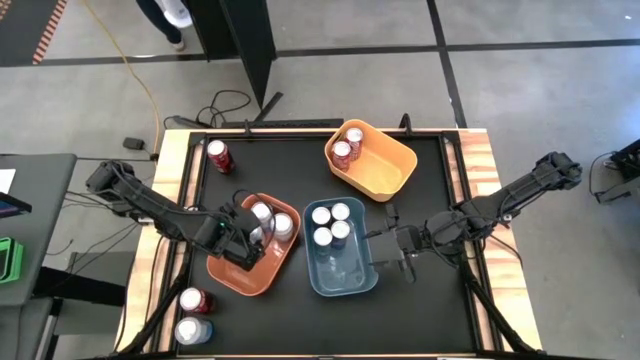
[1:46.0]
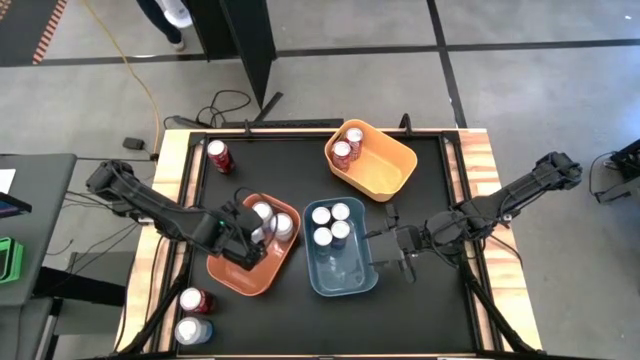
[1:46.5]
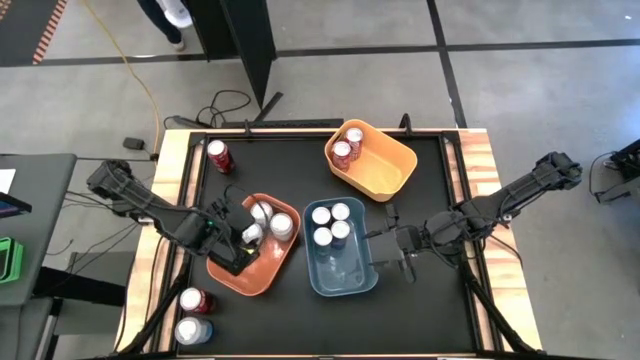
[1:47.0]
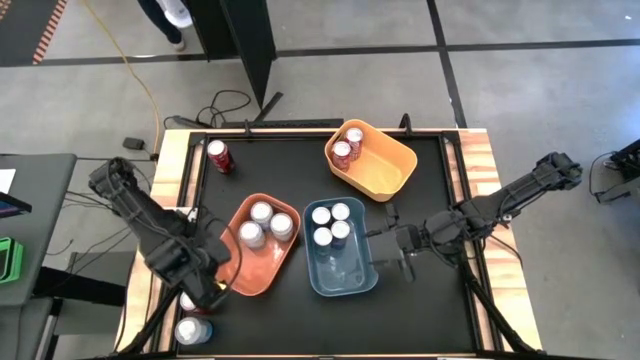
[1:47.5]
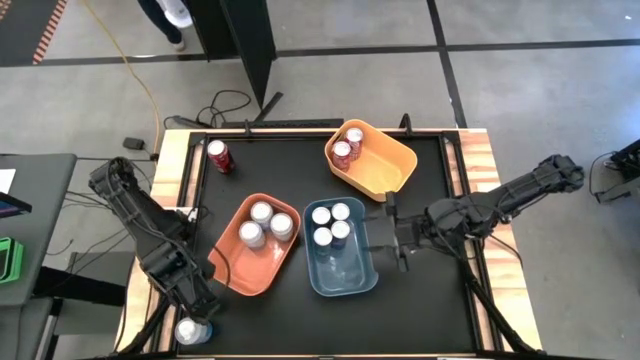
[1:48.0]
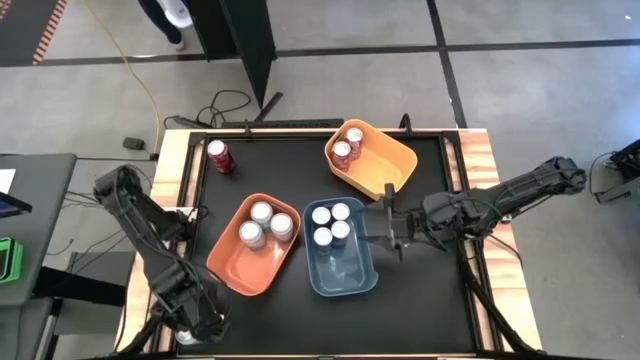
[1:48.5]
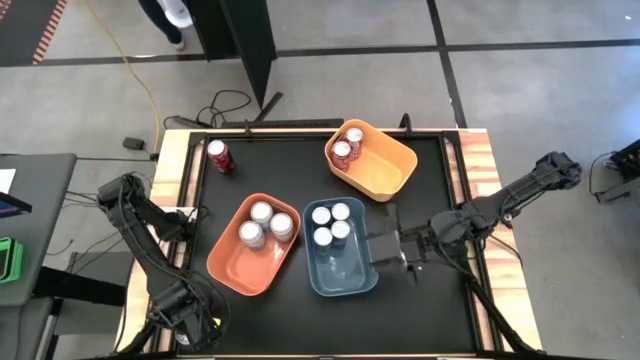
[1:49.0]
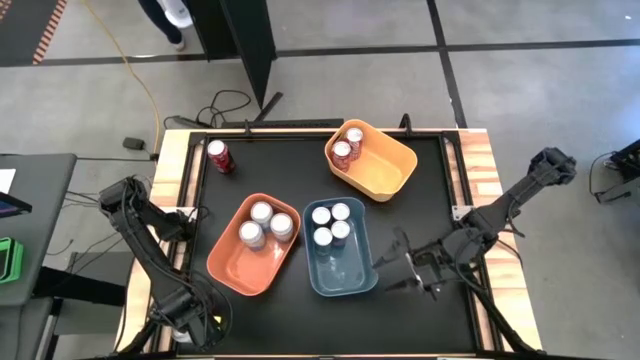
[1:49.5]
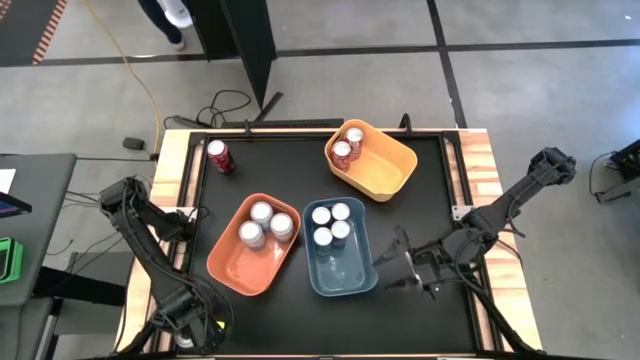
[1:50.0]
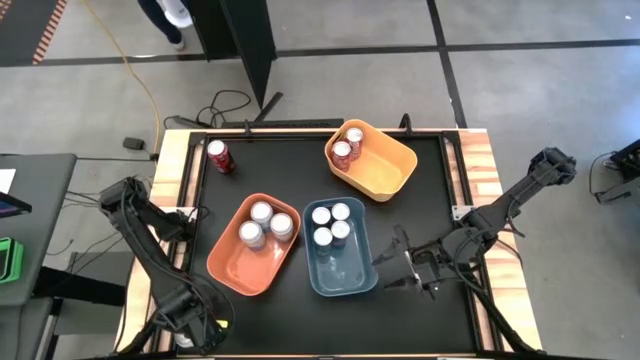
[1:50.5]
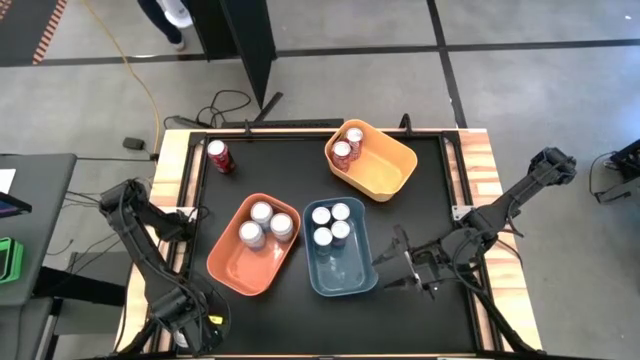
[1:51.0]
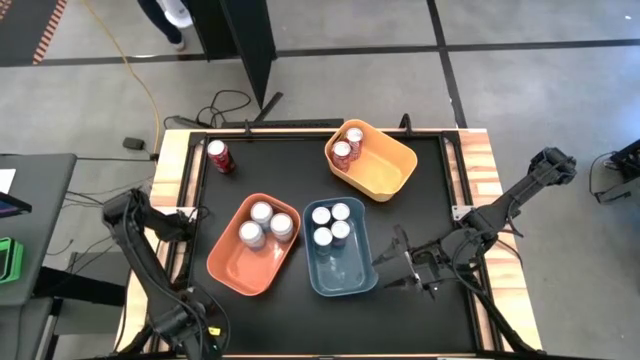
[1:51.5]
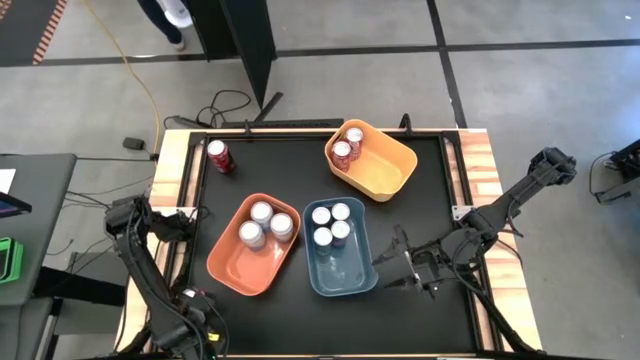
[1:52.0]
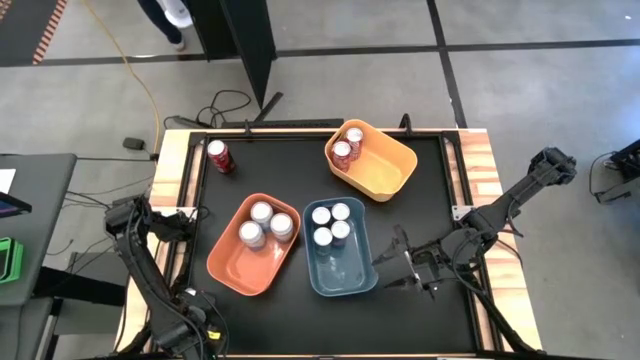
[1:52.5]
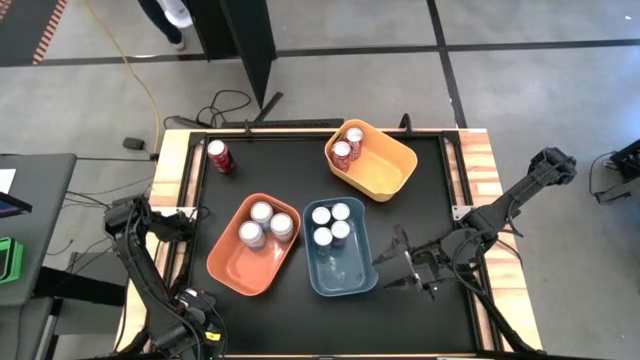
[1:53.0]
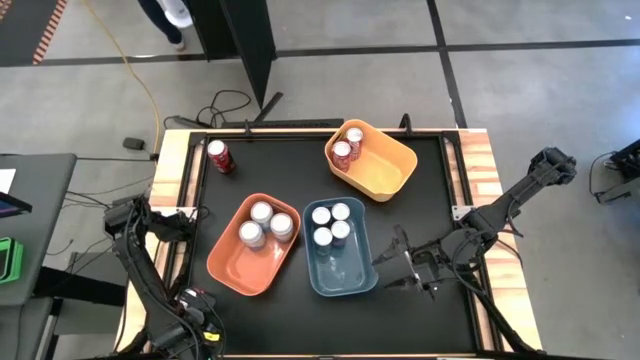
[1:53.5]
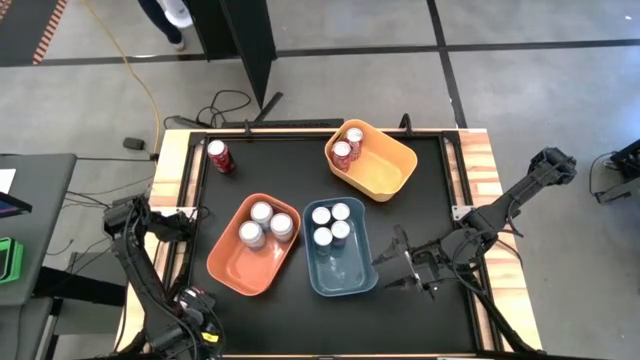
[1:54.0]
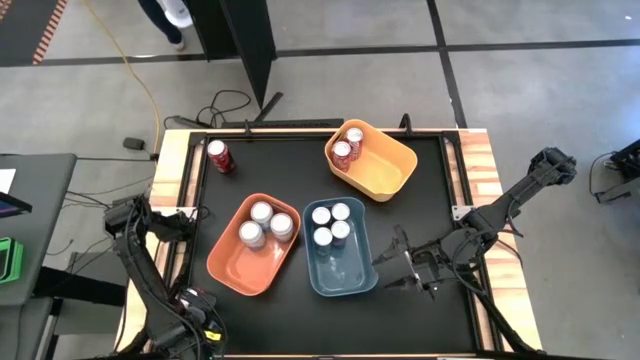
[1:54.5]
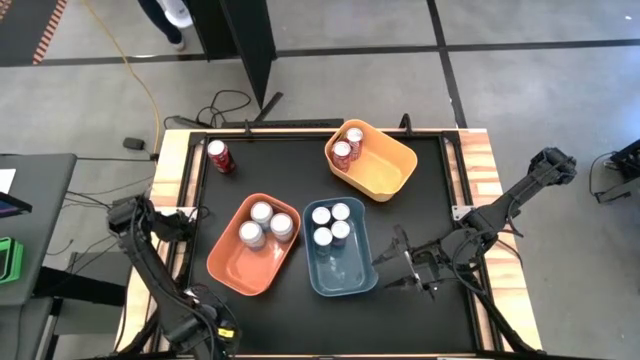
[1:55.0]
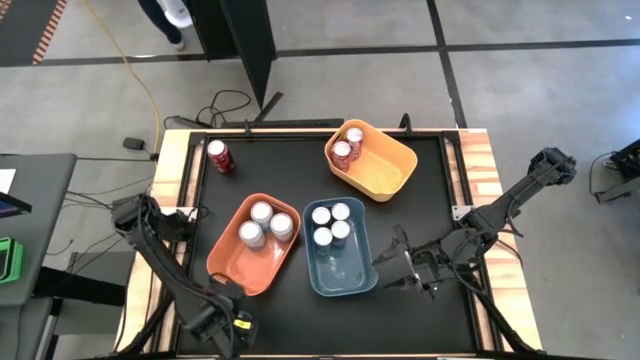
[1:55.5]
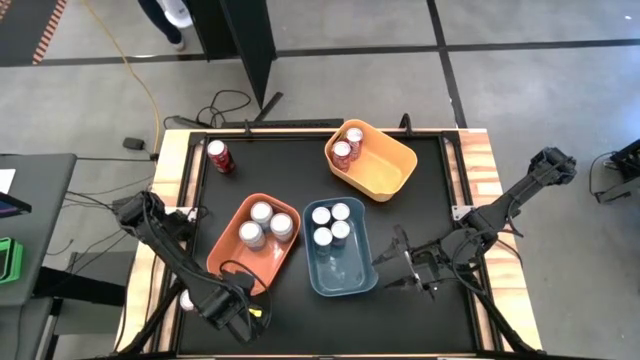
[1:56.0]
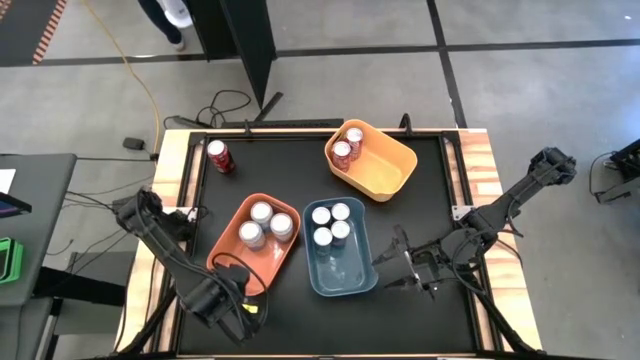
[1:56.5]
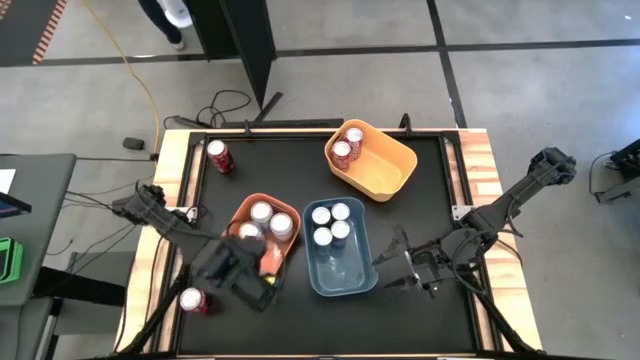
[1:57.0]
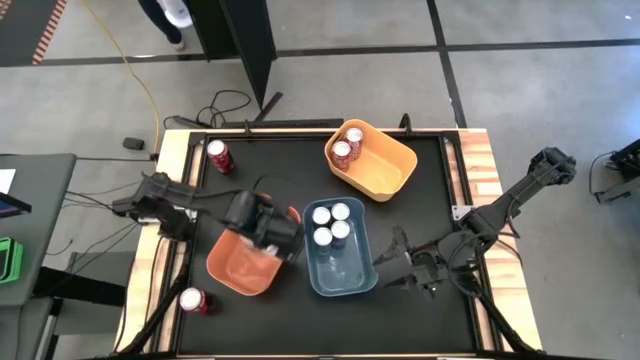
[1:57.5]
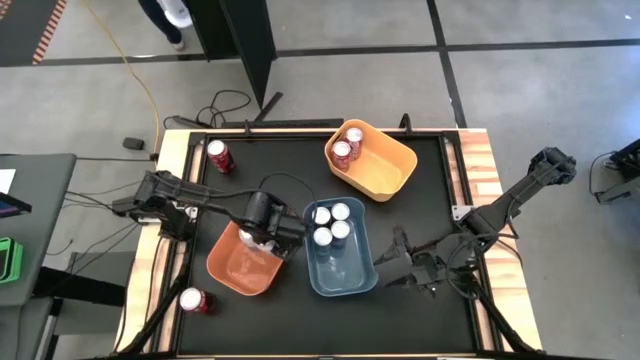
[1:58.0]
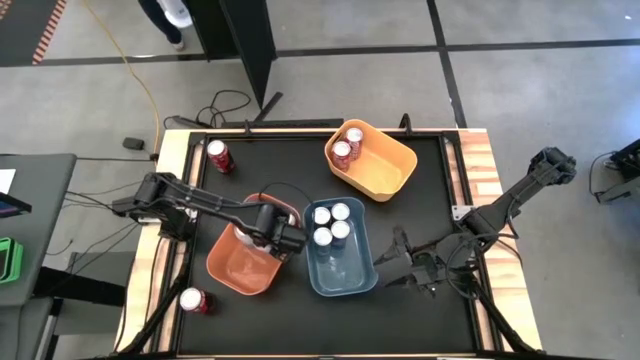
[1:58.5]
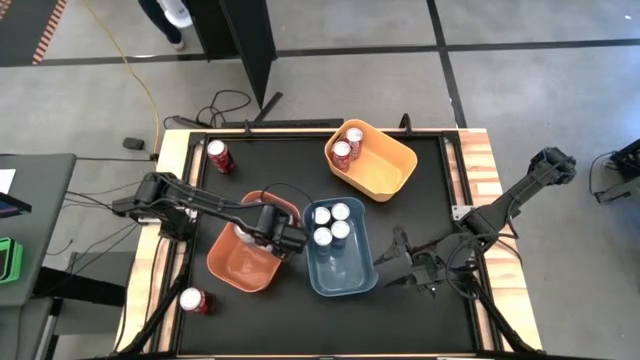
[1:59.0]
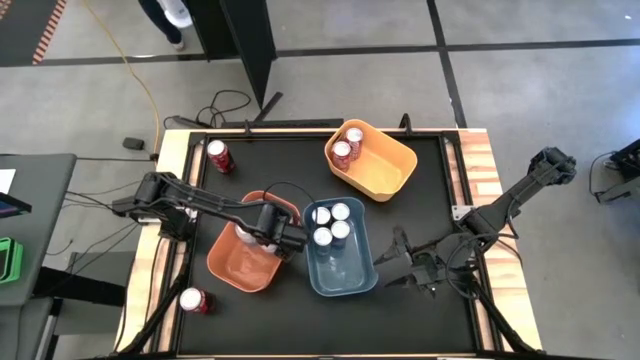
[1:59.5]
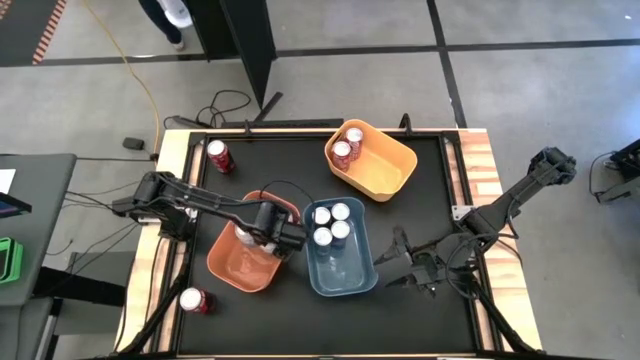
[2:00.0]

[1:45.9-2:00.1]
Task: Sort soda cans
Put the blue and white soda can into the orange bin

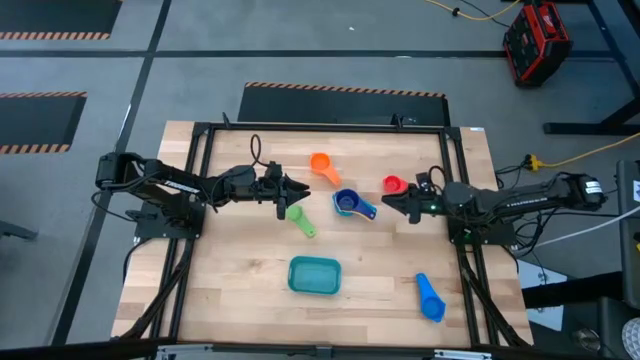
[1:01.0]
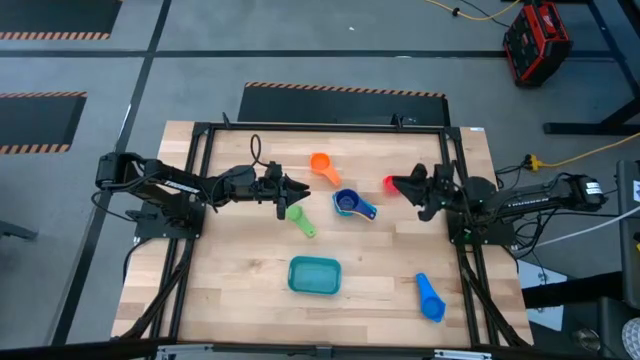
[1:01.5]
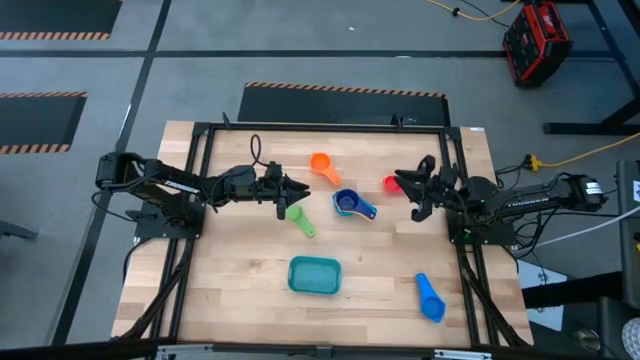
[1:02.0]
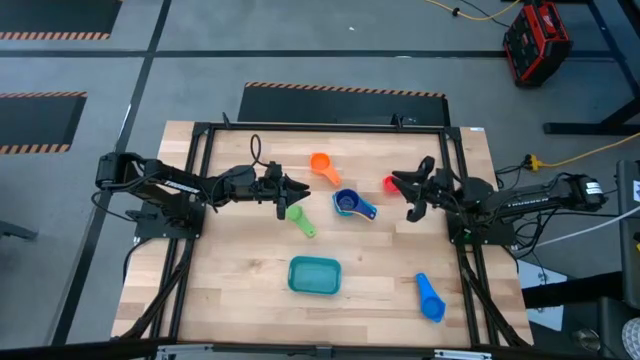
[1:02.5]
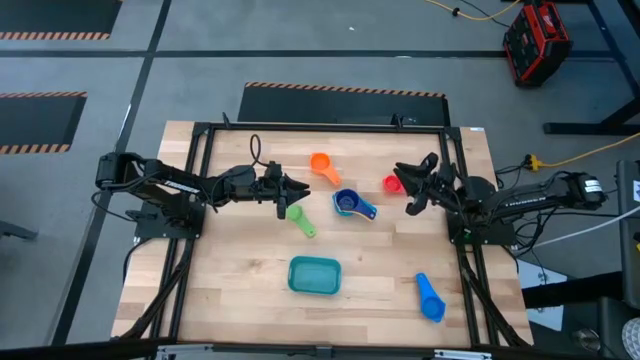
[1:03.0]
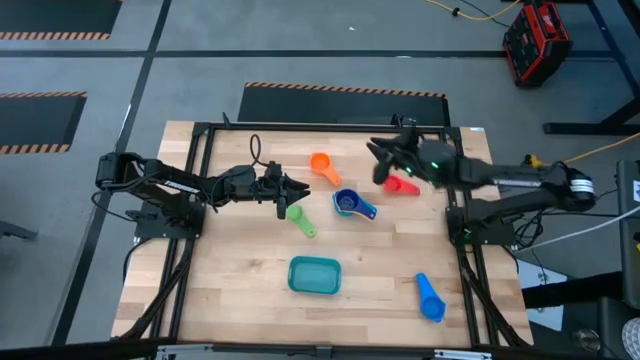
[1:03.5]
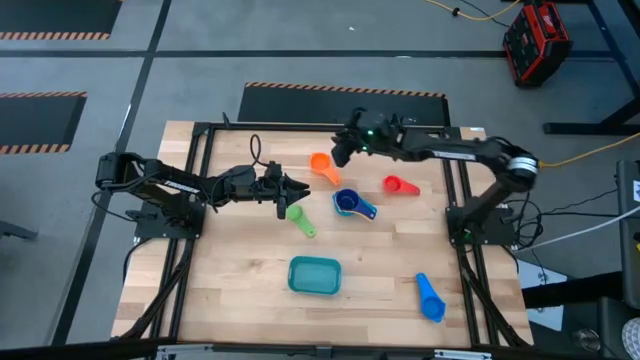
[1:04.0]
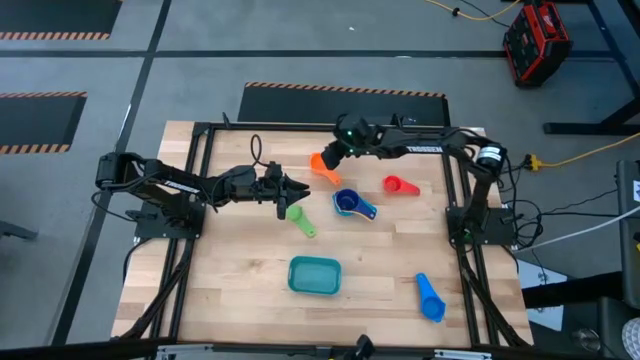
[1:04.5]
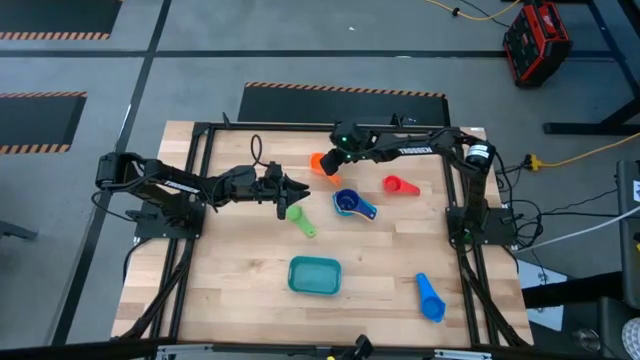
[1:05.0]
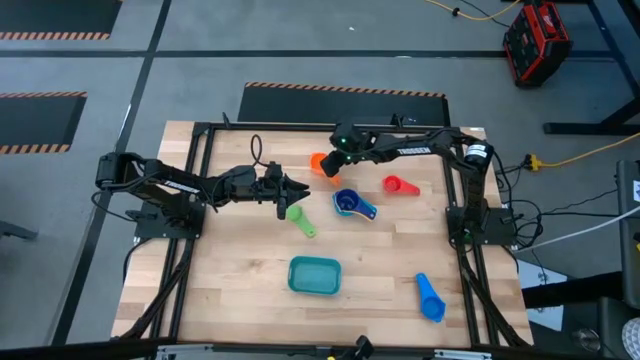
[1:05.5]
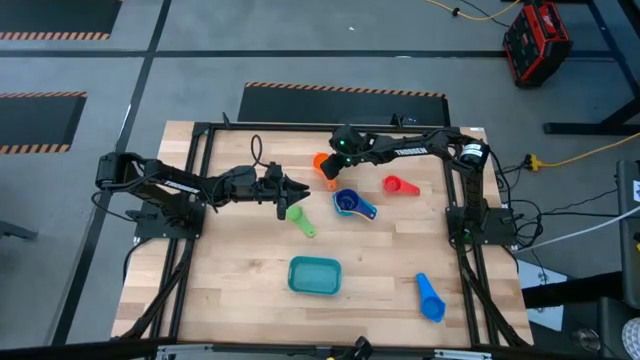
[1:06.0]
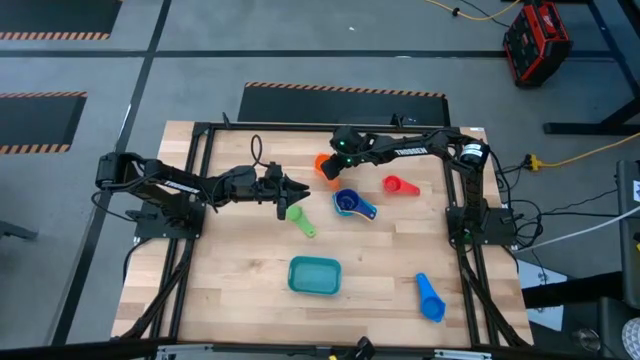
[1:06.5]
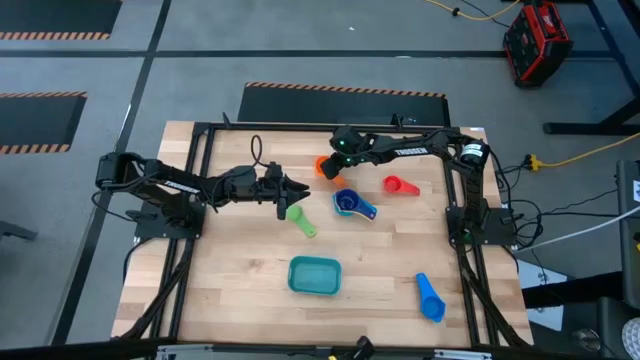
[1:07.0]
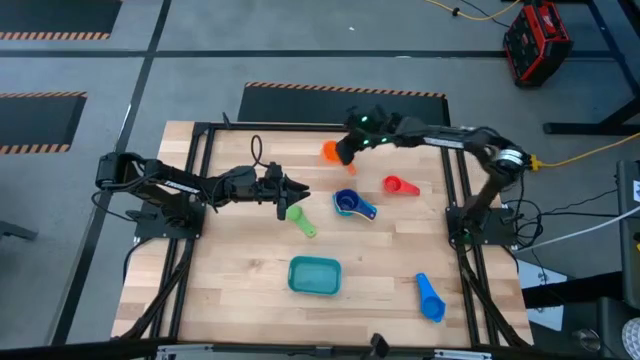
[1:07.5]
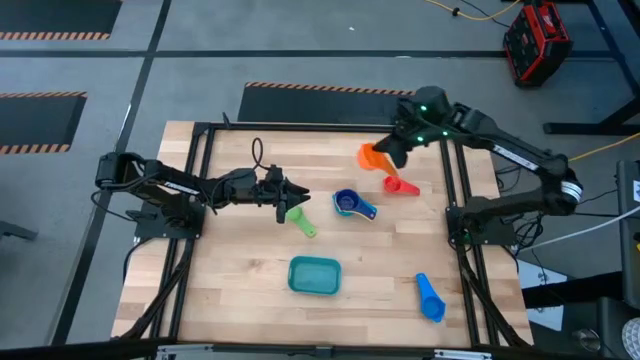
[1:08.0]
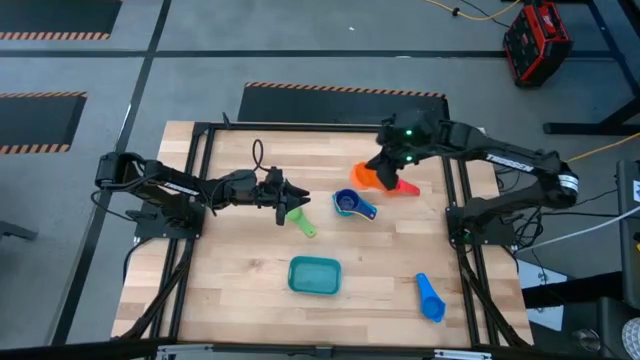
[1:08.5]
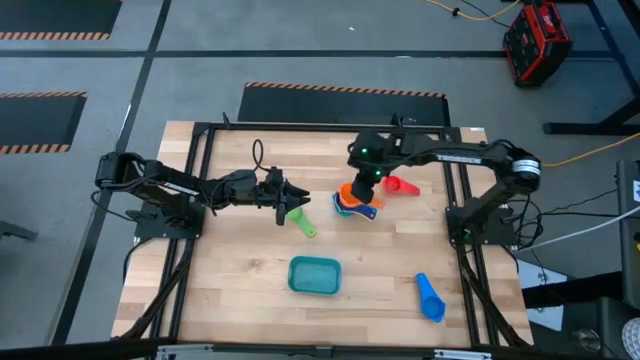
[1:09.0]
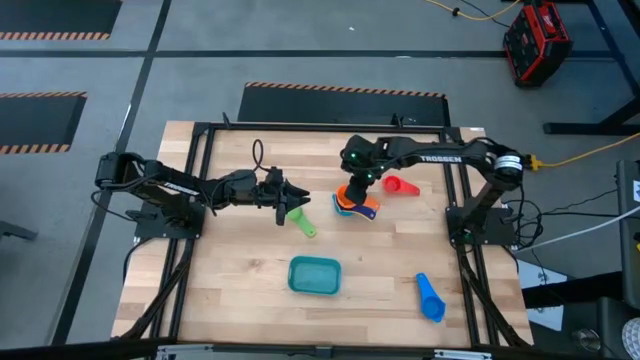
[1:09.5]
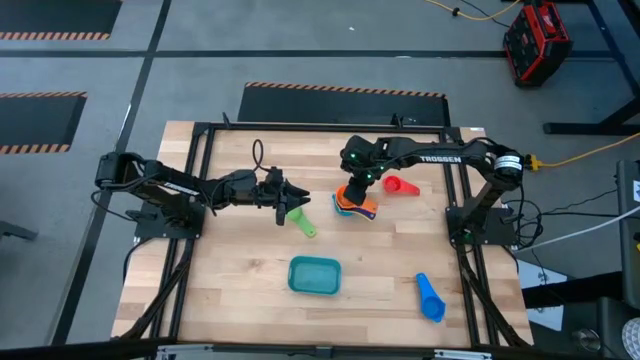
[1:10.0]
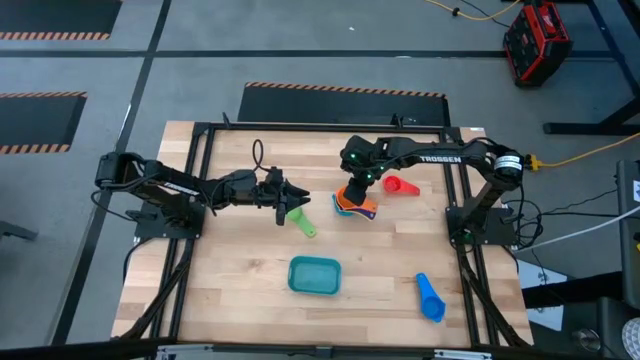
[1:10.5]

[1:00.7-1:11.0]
Task: Nest measuring cups in basket
Stack the orange measuring cup on top of the dark blue measuring cup
